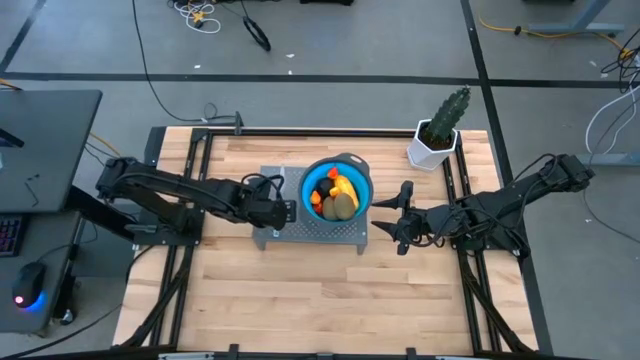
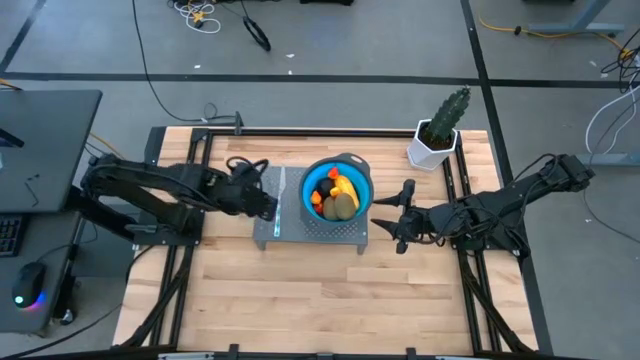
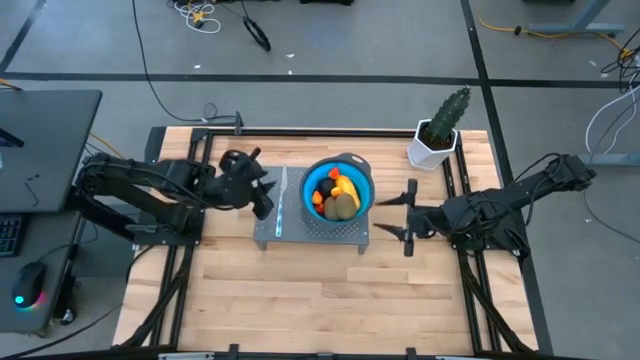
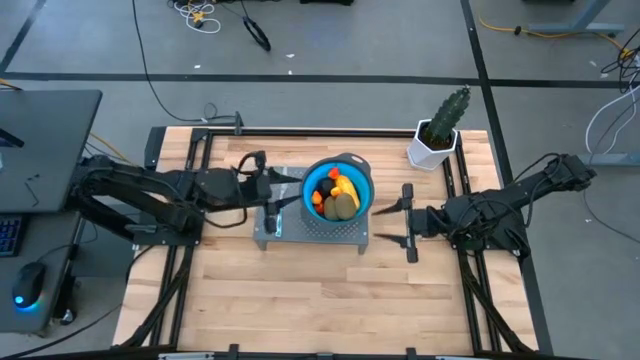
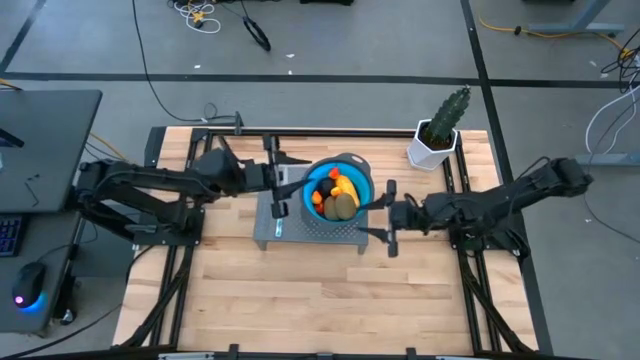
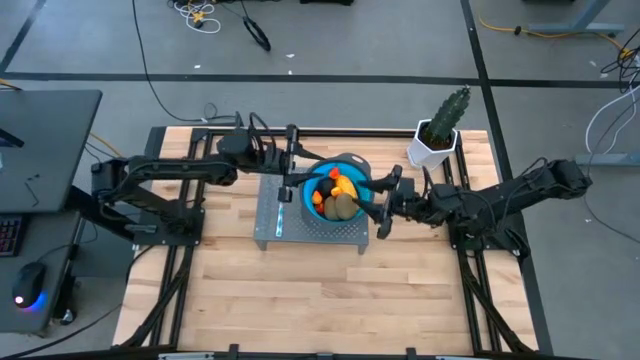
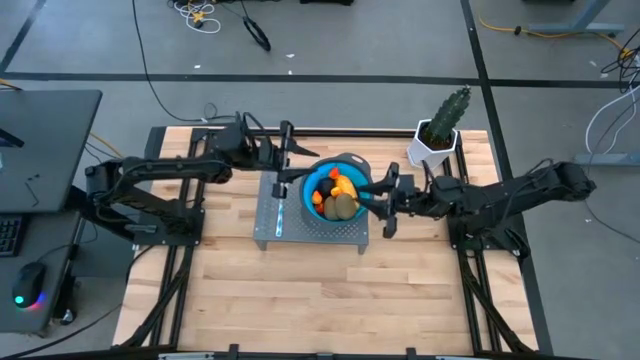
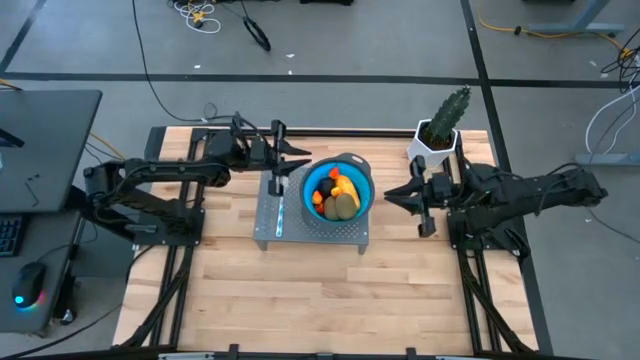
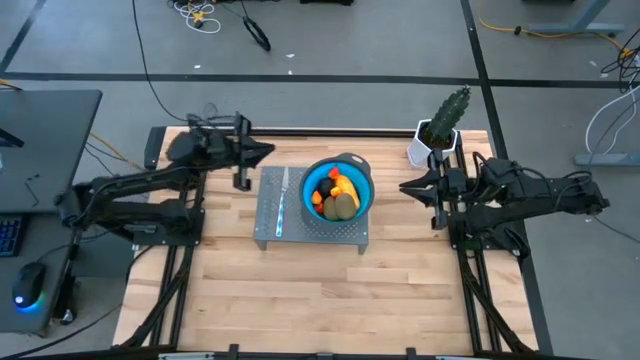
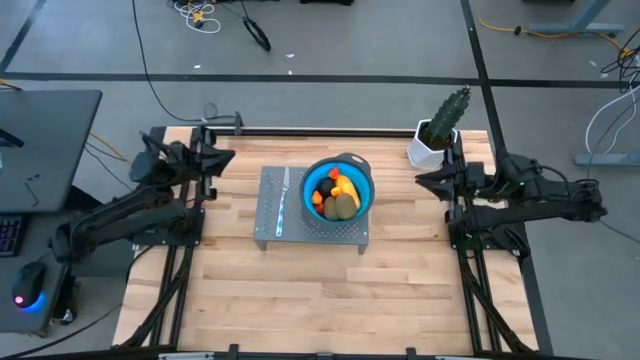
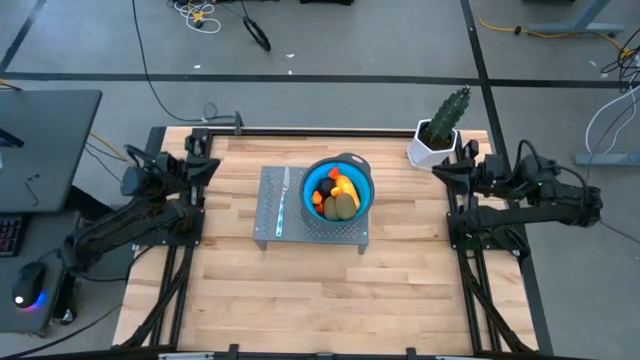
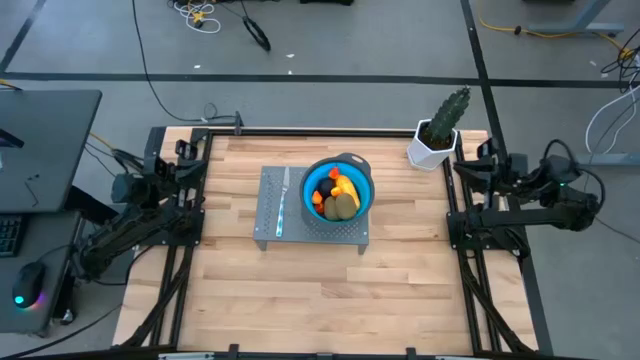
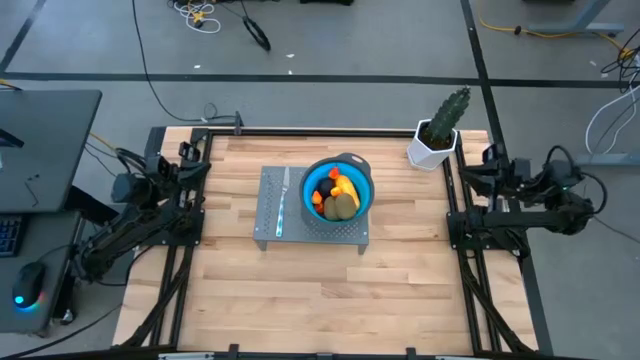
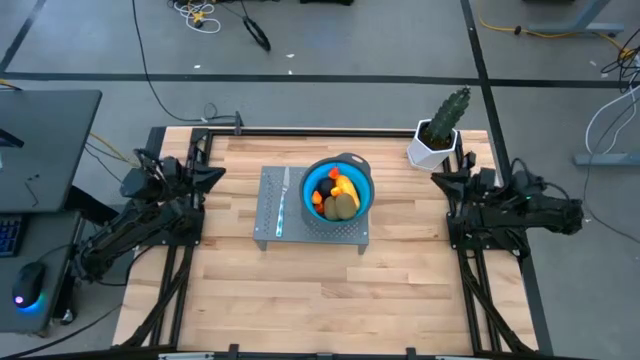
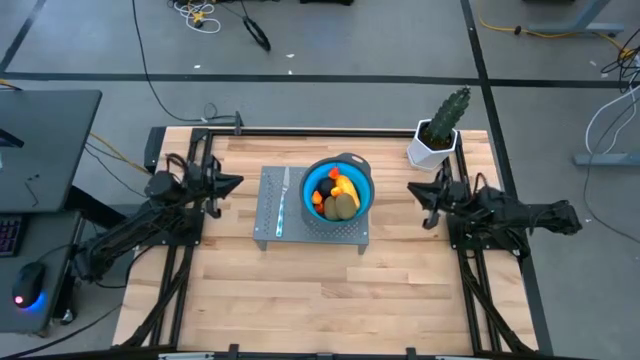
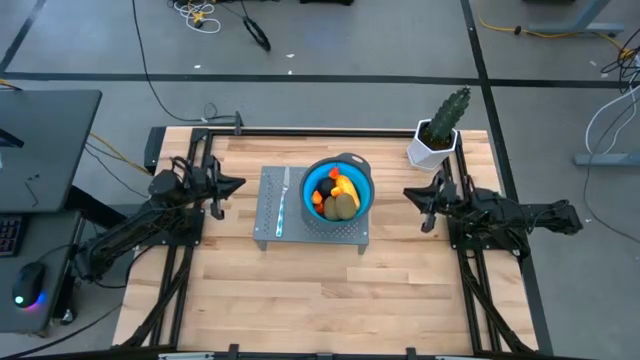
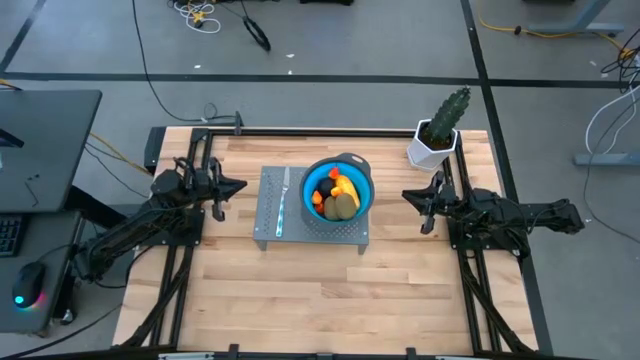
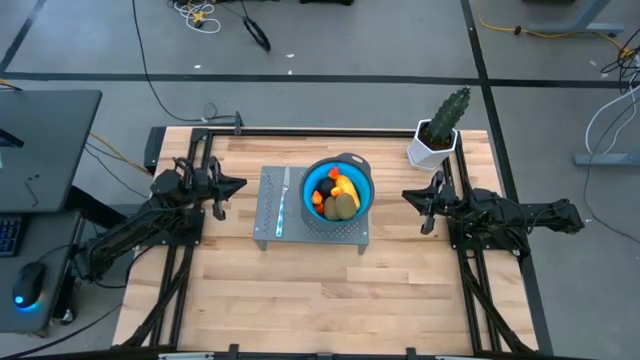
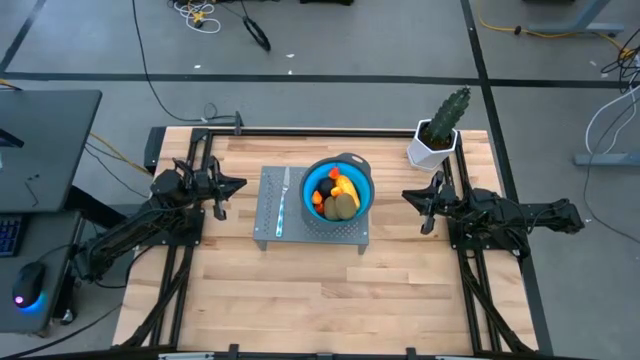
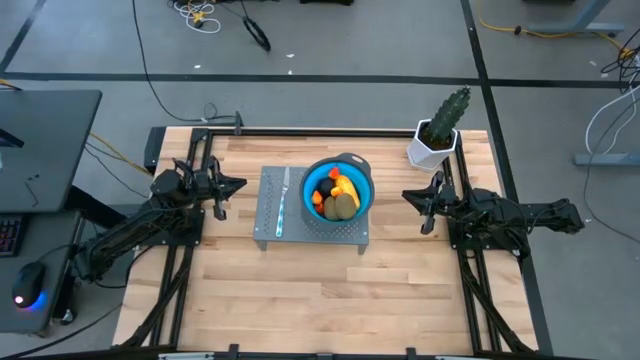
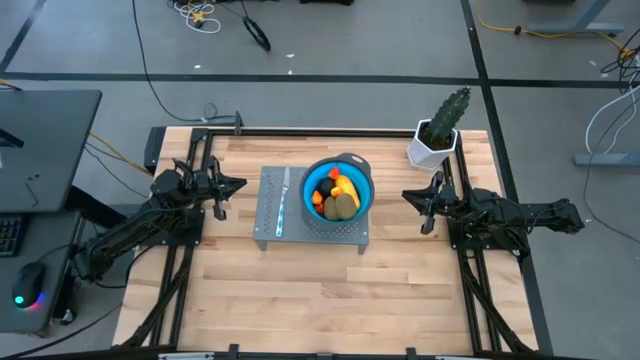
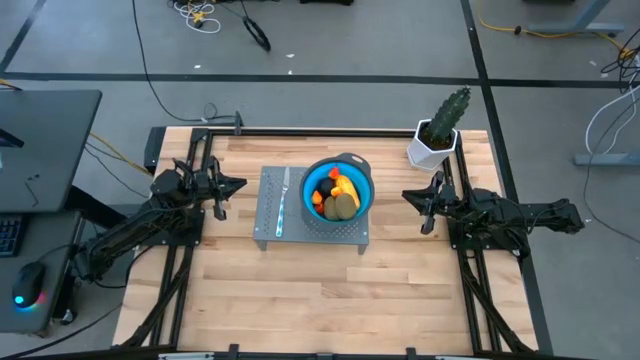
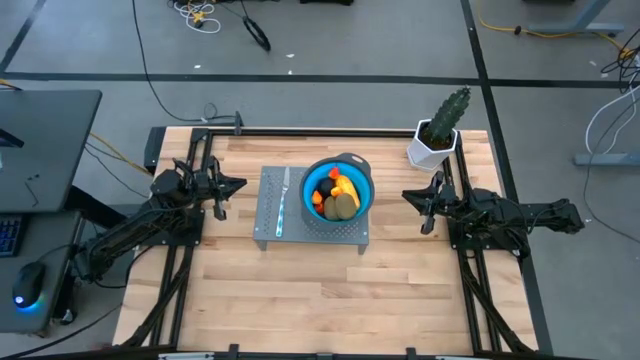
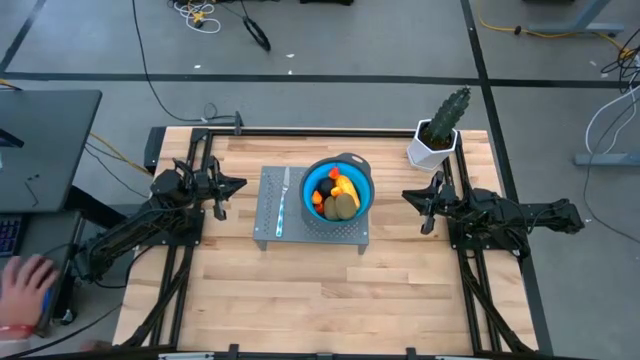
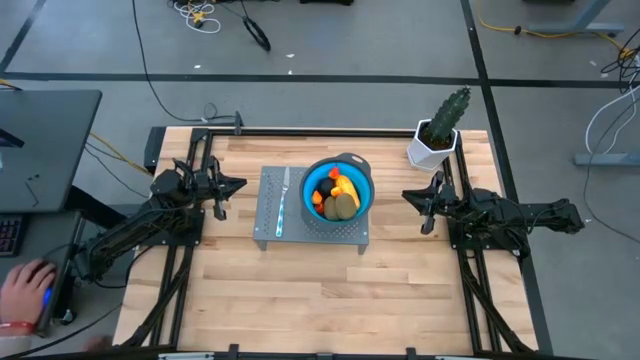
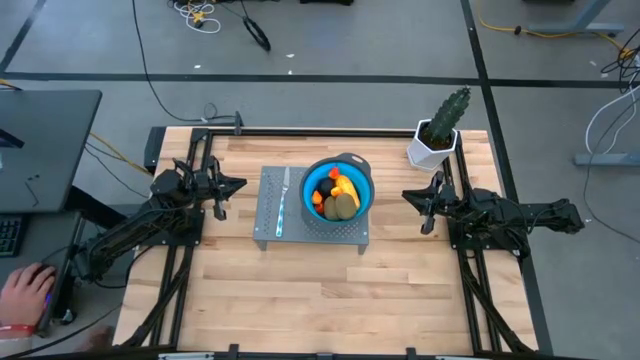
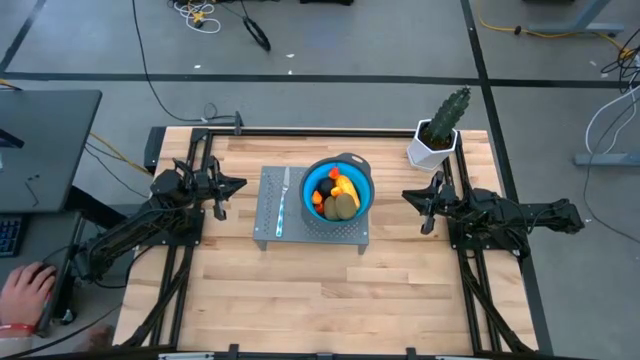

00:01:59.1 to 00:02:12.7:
Task: Pick & Place Fruit
Return to Home Position

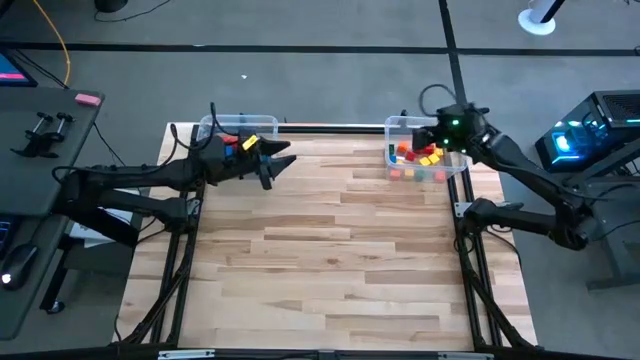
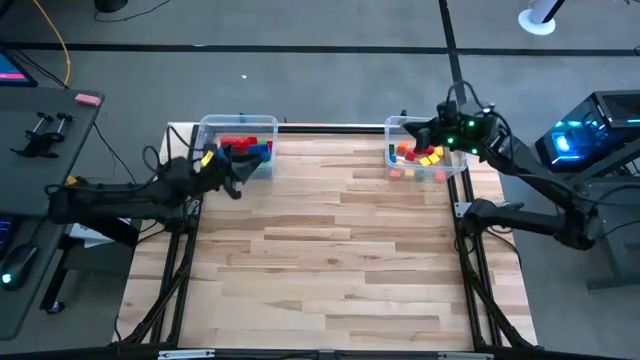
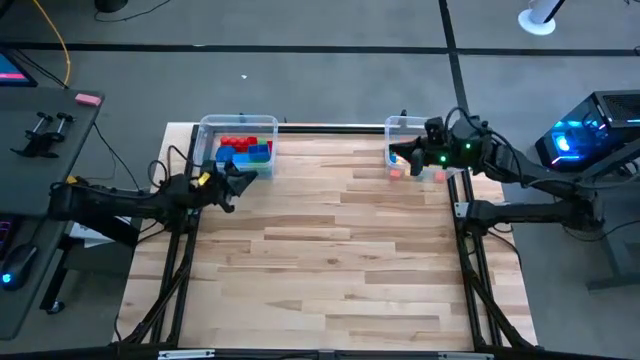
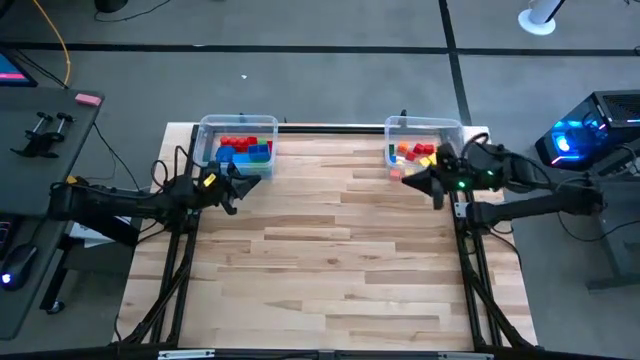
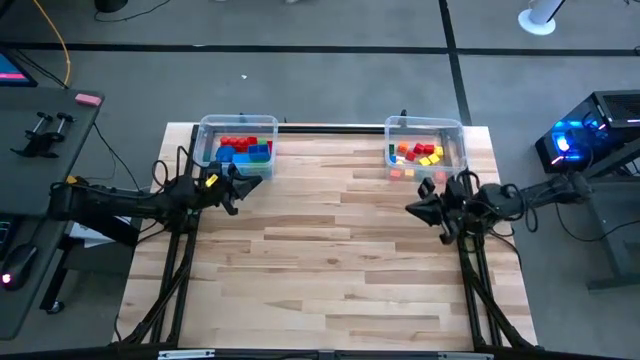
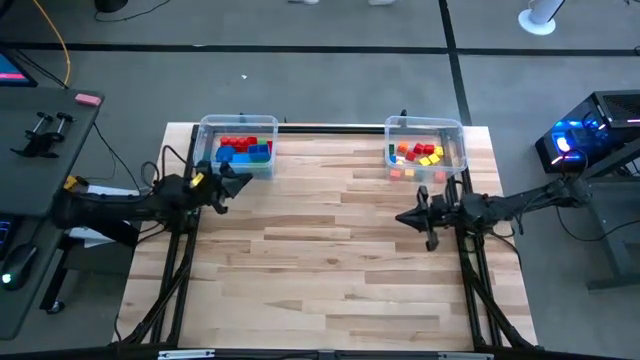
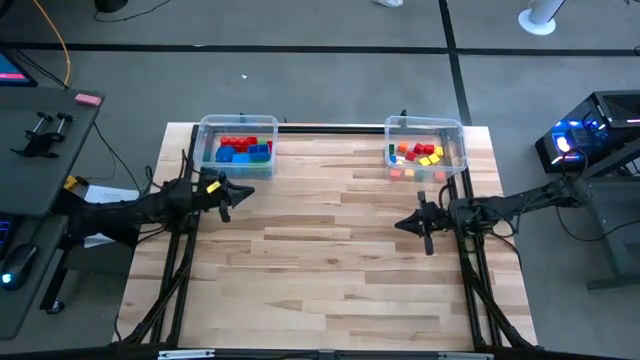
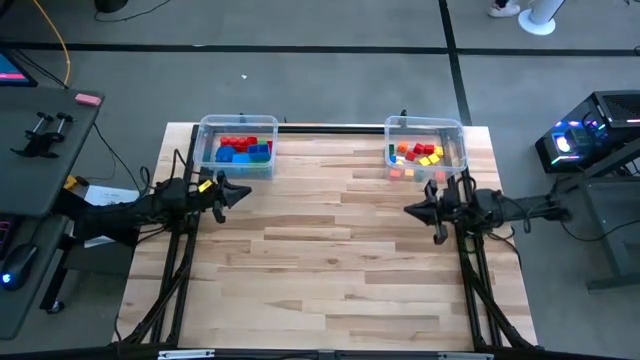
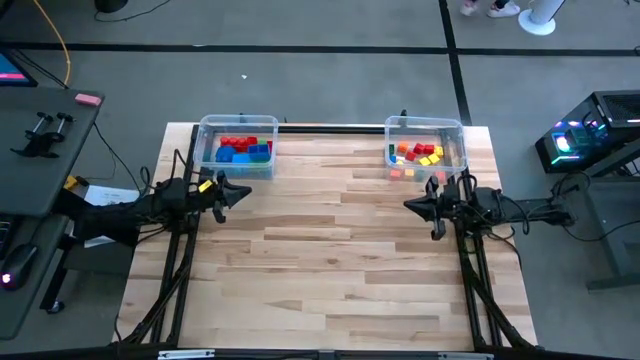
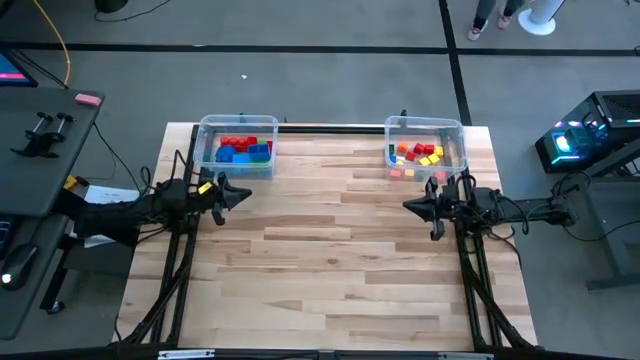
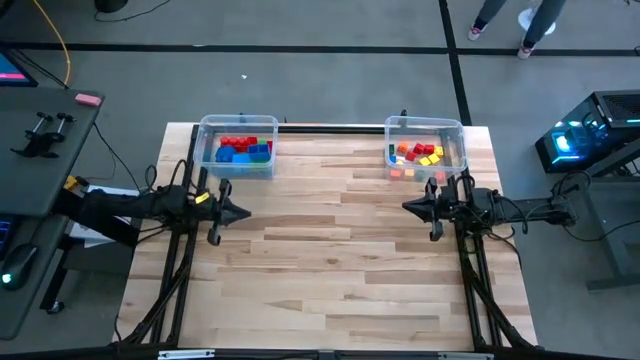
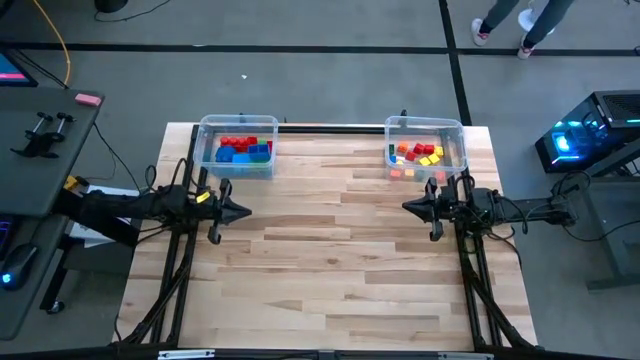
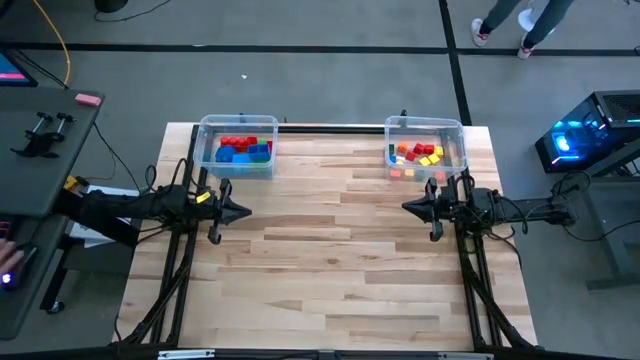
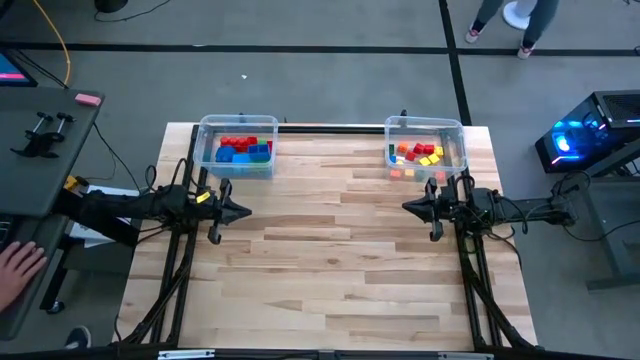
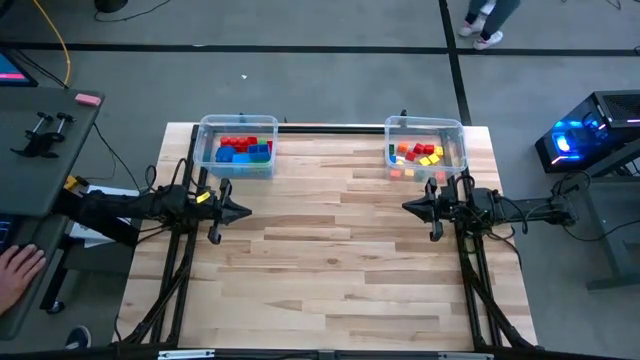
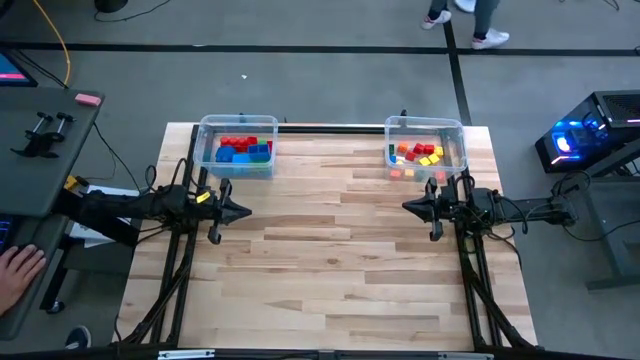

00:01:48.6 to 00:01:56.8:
Task: Sort blocks by size
Return to home position
